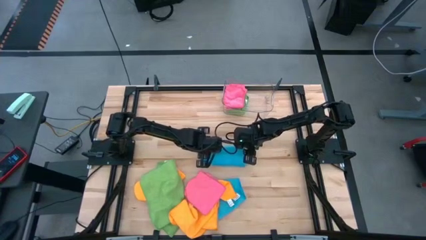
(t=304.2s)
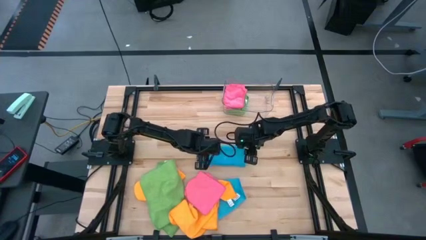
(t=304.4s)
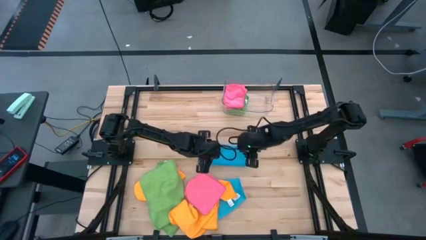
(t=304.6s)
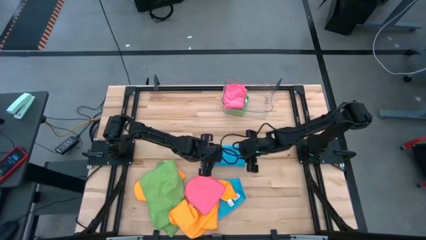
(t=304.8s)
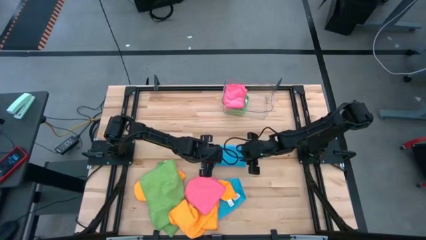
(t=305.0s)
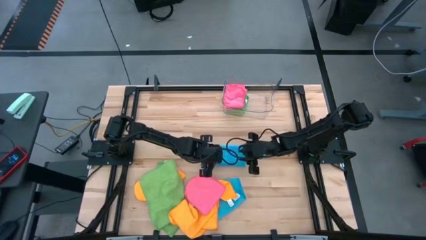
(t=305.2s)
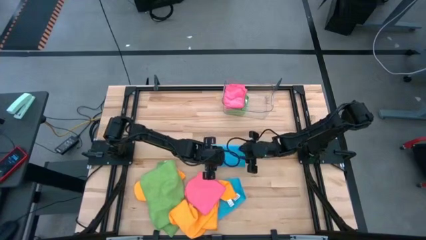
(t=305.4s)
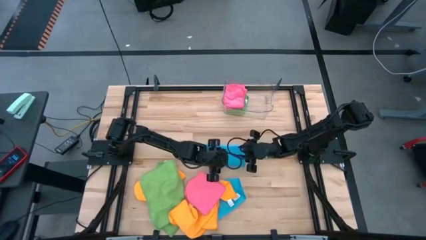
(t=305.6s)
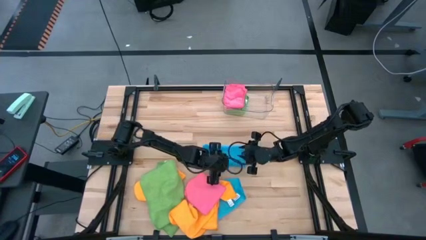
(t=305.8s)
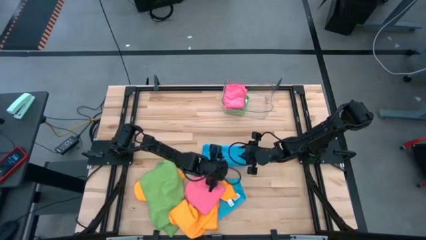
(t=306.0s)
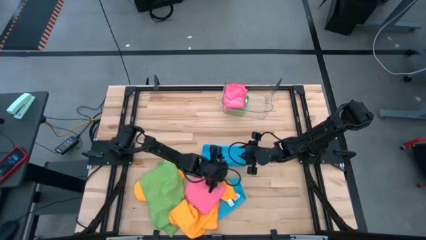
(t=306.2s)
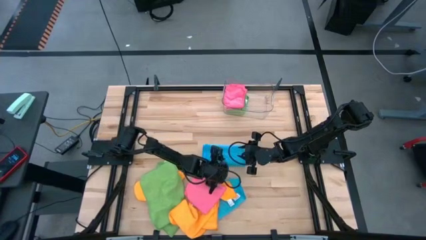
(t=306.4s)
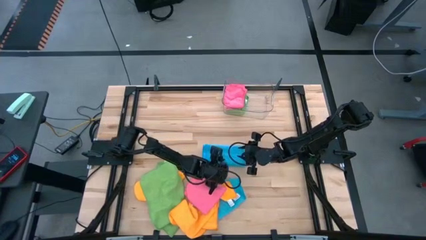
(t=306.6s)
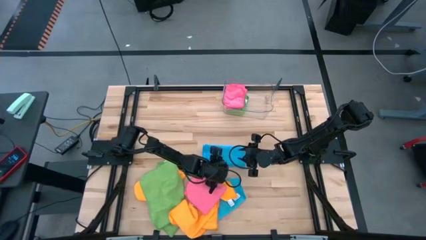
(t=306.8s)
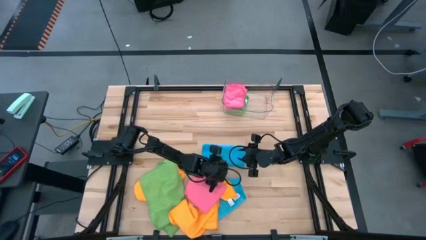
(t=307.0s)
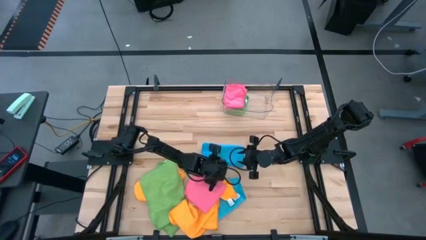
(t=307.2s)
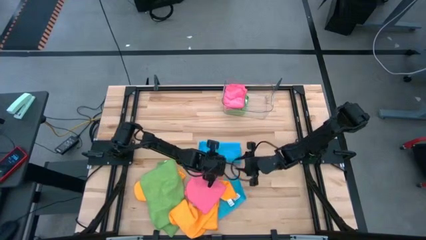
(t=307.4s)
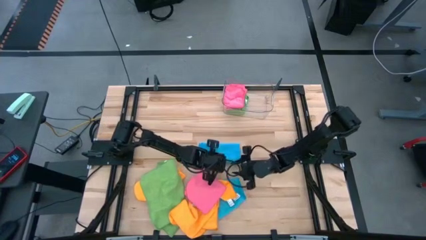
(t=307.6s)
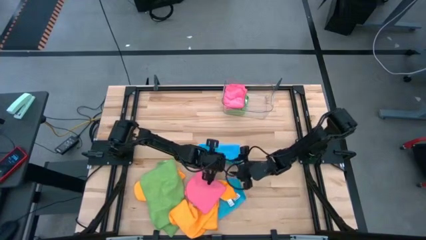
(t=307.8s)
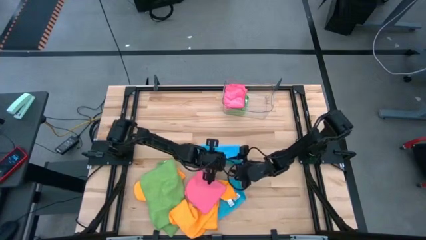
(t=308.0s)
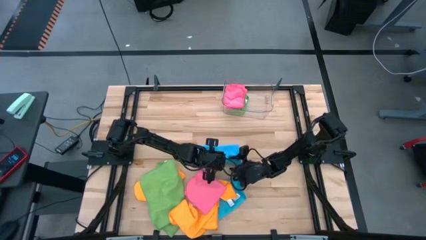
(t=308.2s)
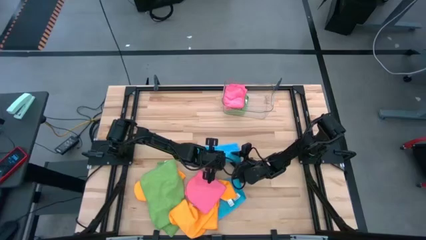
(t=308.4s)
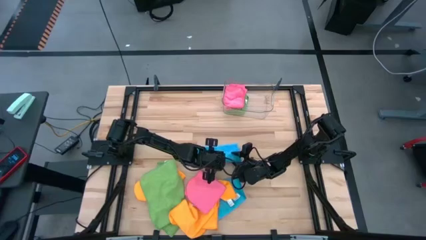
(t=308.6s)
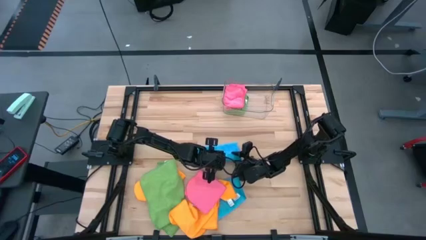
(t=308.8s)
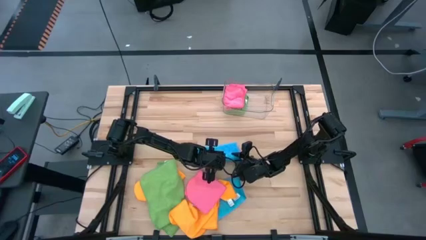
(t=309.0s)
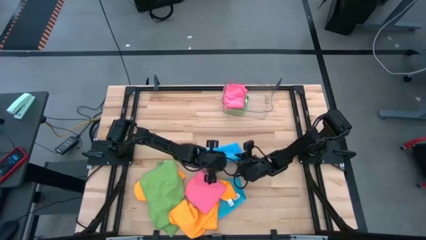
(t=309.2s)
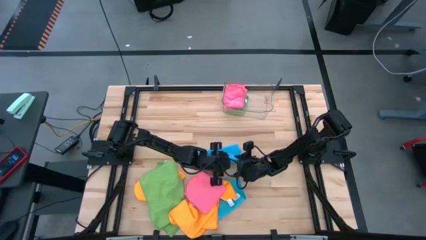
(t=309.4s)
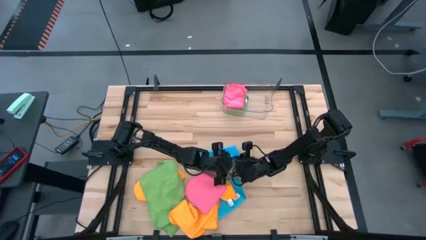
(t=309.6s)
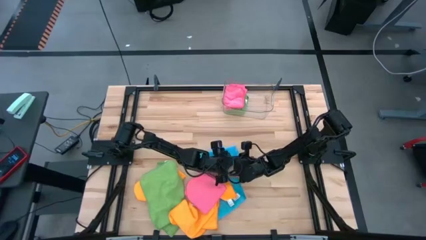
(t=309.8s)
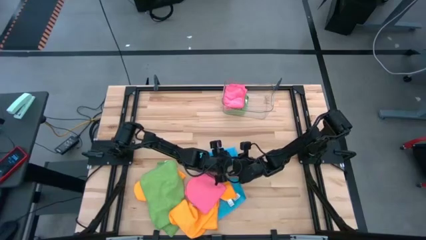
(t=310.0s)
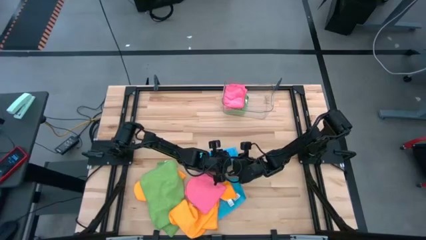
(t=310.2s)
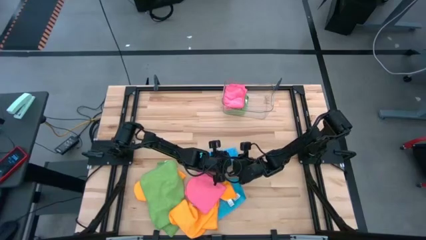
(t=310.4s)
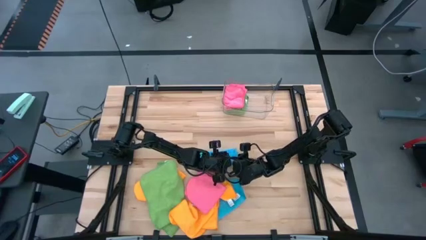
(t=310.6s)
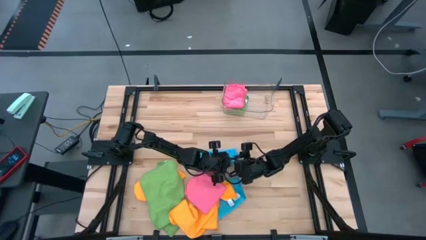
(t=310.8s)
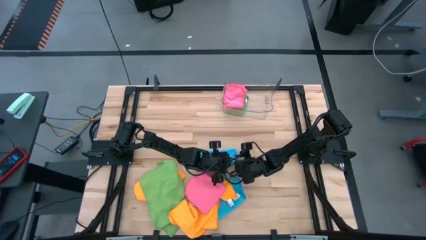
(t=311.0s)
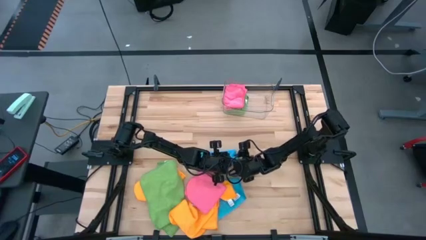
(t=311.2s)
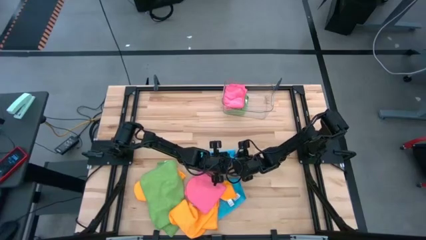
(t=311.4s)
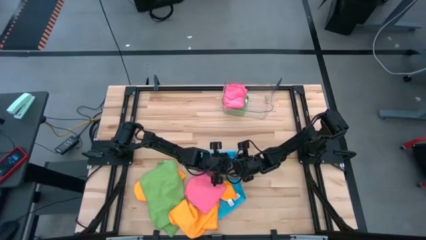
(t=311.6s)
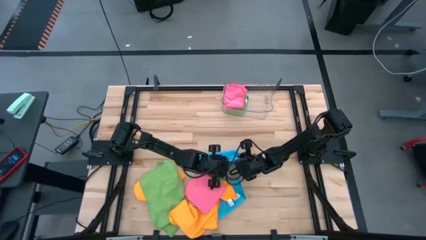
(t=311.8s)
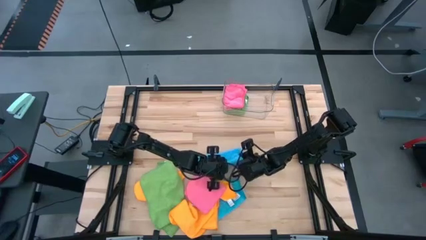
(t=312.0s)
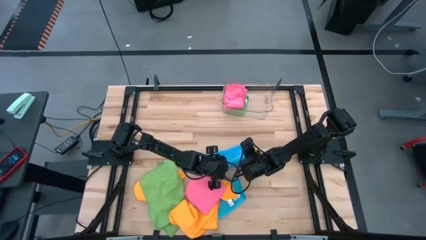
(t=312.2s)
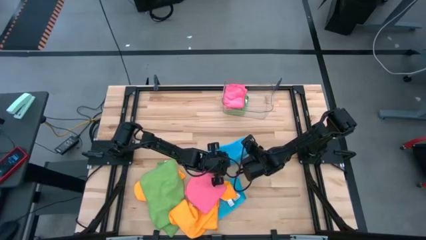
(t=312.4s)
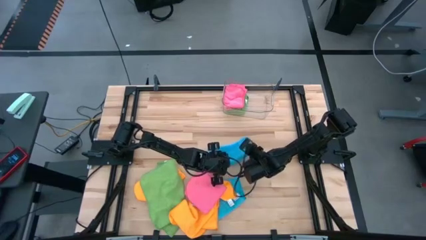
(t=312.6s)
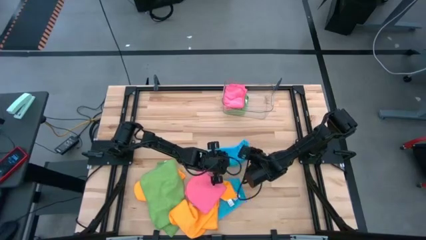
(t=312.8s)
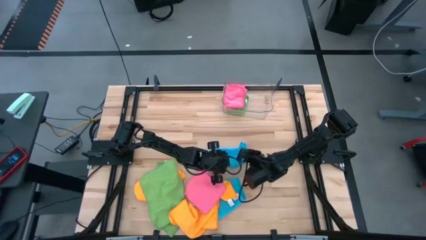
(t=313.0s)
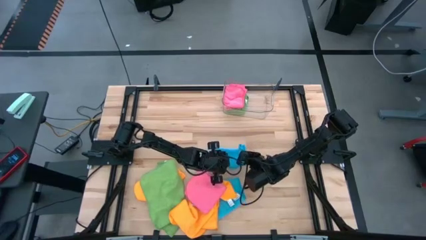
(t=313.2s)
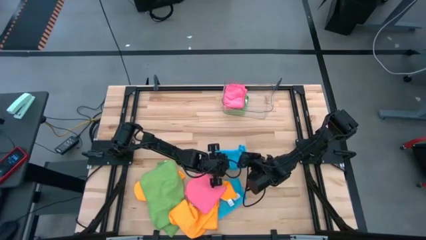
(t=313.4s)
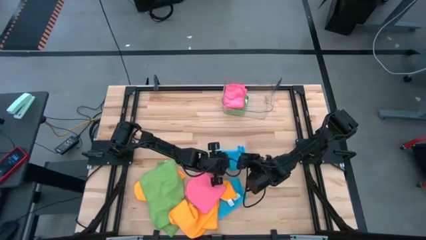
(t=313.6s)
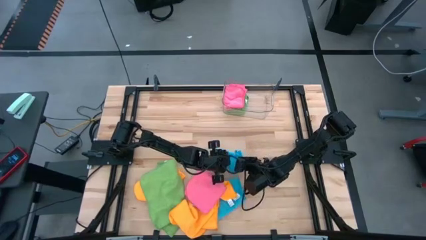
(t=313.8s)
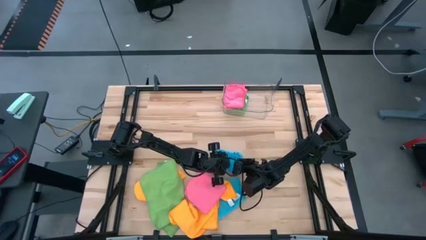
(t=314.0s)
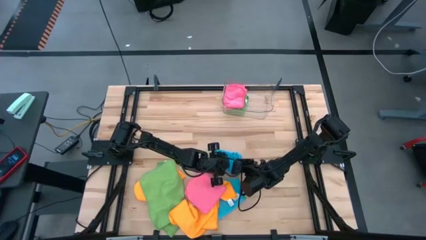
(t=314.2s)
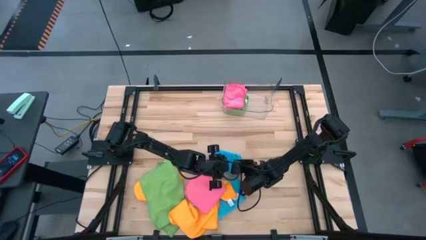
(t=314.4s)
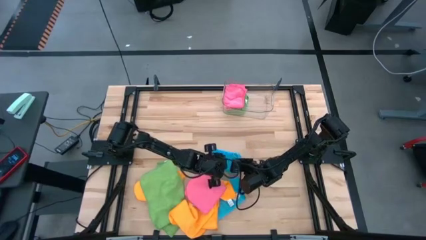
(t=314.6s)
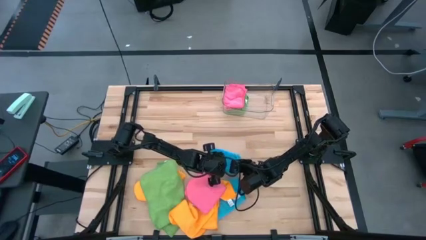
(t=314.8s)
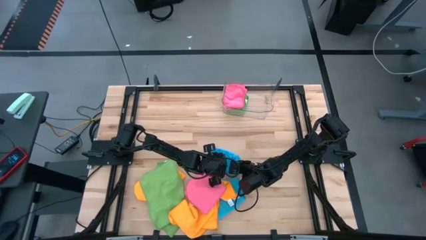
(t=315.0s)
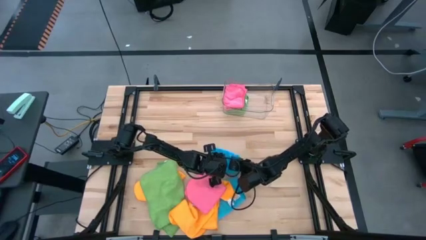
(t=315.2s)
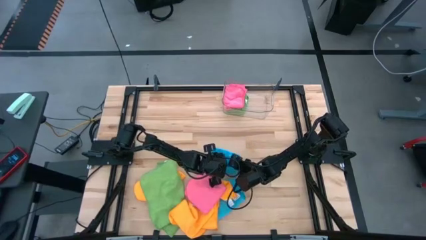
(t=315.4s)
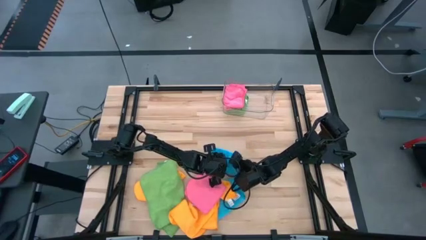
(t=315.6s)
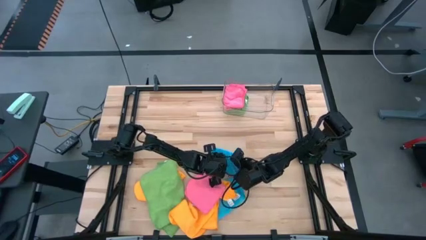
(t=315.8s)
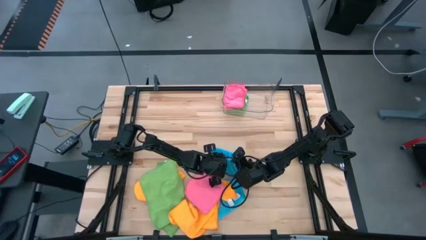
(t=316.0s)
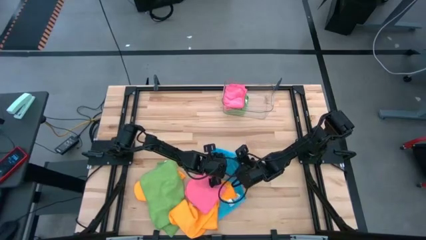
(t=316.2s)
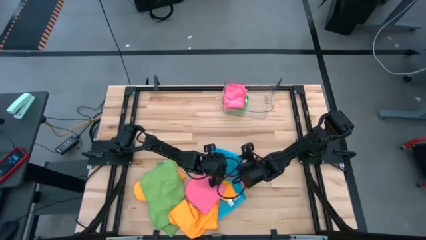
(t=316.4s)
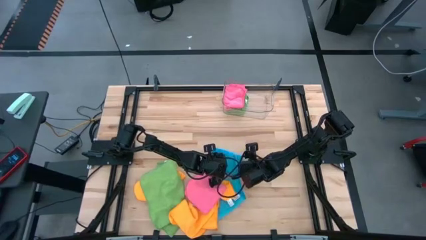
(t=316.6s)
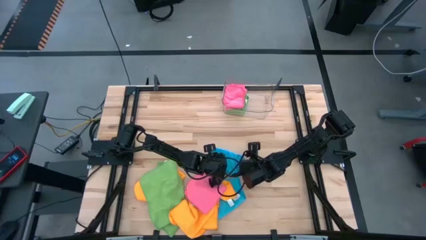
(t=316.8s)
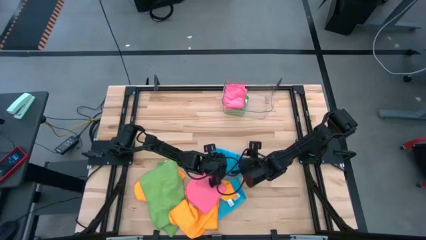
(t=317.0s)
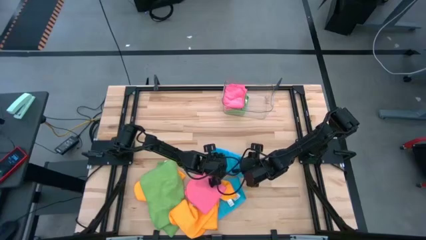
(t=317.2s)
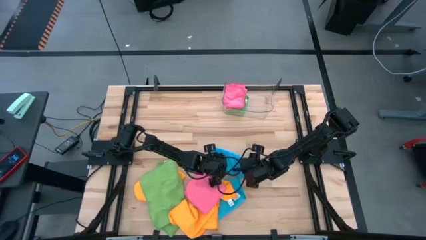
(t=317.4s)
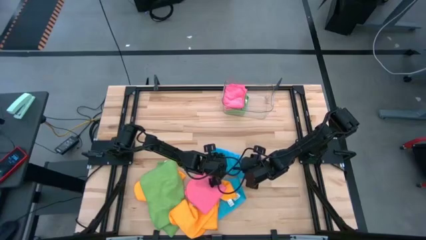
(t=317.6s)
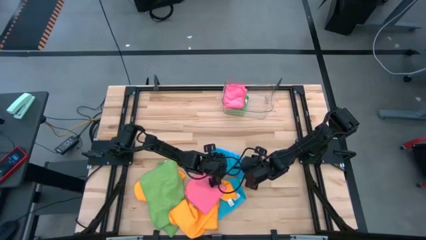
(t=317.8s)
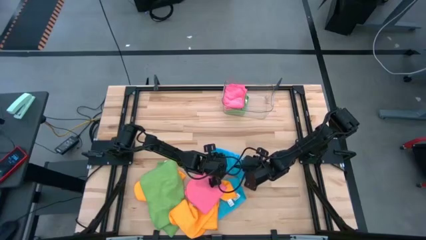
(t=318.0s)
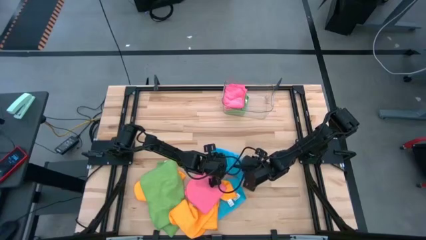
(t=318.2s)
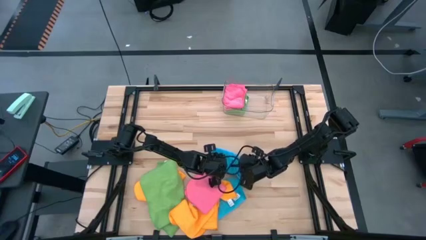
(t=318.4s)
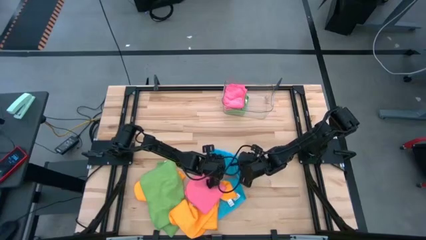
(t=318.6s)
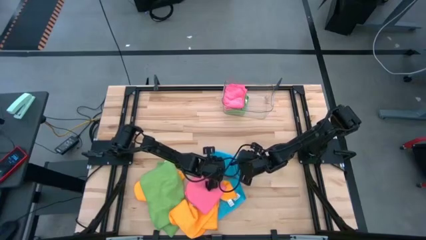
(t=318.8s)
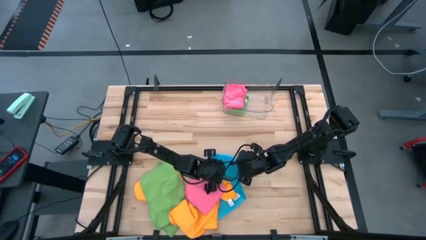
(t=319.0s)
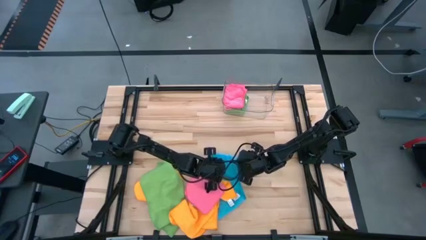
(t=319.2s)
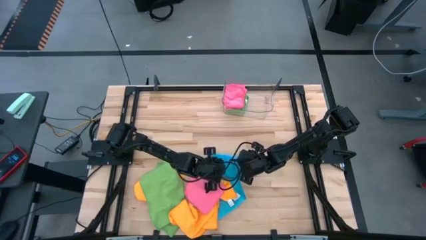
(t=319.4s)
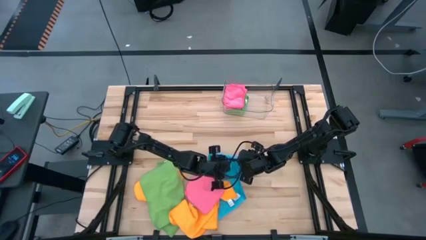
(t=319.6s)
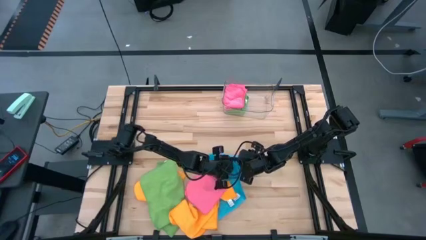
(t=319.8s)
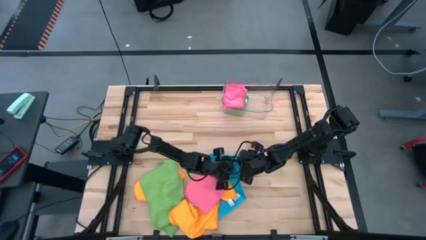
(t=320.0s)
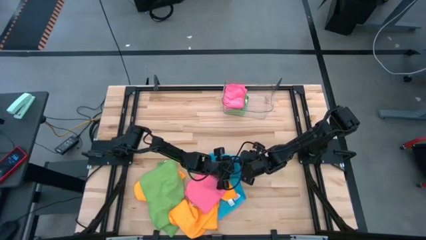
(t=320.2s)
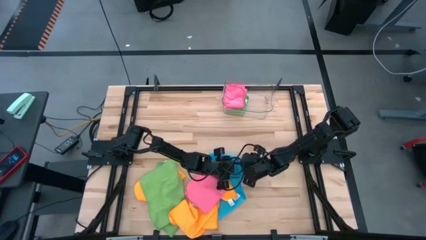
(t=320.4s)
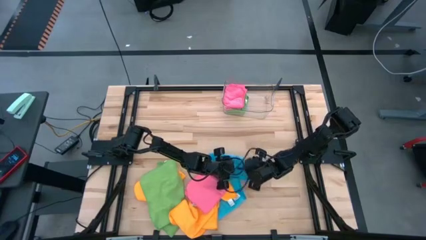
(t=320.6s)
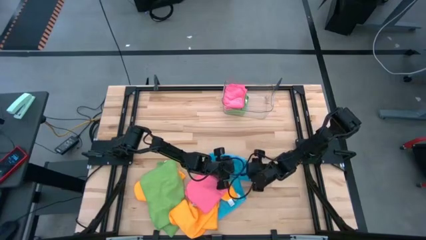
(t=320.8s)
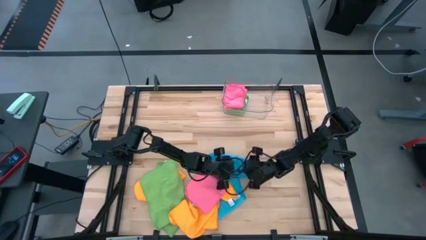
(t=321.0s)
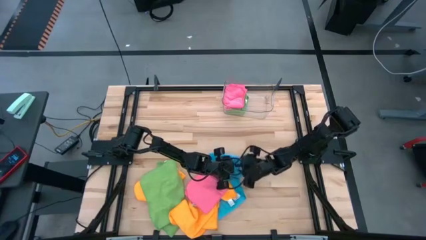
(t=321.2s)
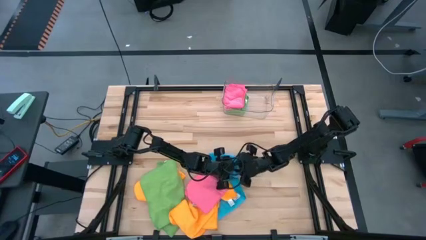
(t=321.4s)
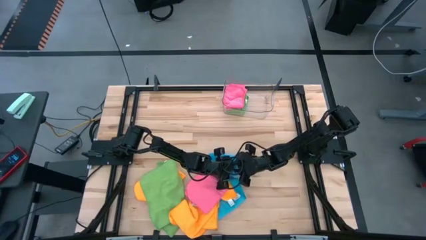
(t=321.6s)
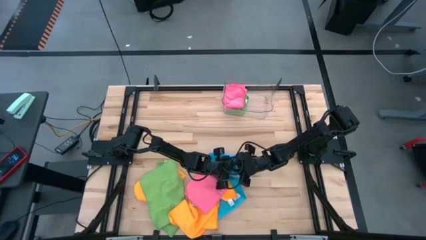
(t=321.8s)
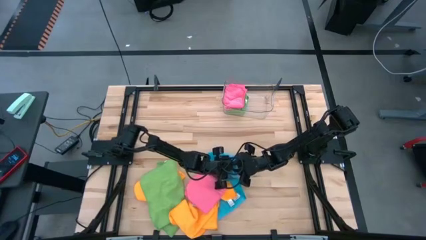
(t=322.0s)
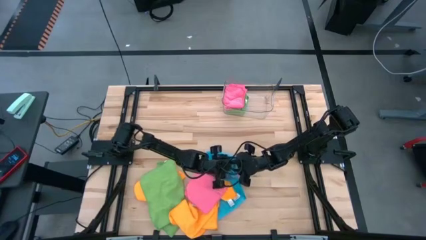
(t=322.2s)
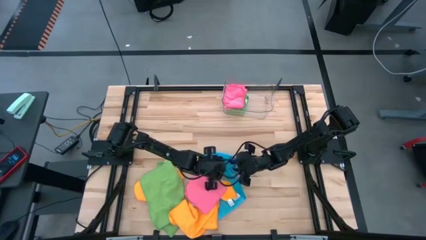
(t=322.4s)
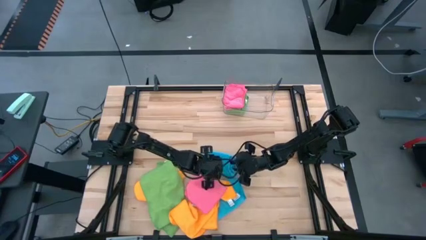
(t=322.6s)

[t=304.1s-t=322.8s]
Task: Fold microfiber towels
Fold the top blue towel
